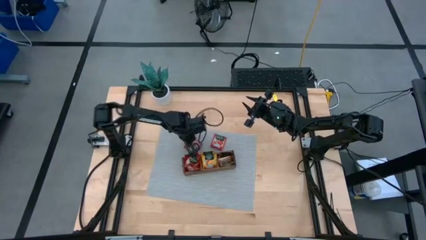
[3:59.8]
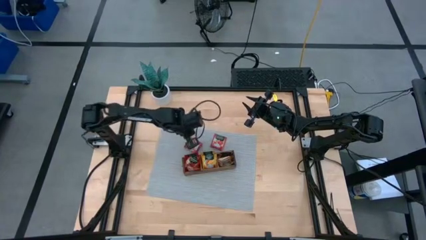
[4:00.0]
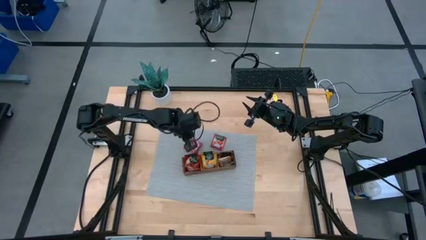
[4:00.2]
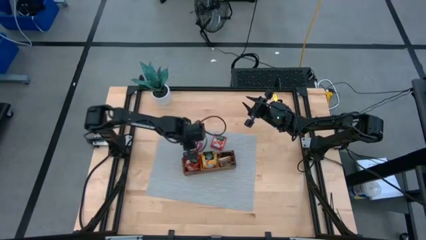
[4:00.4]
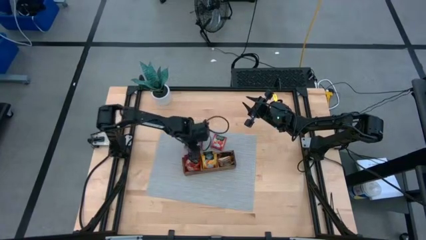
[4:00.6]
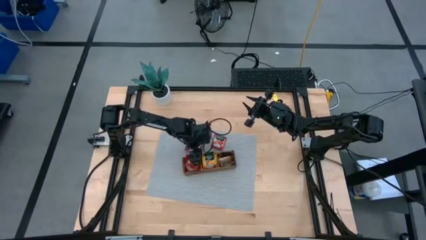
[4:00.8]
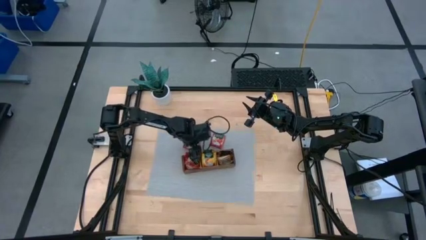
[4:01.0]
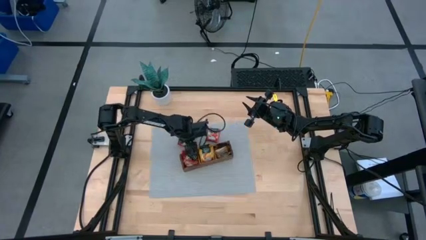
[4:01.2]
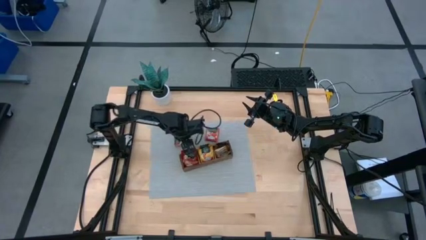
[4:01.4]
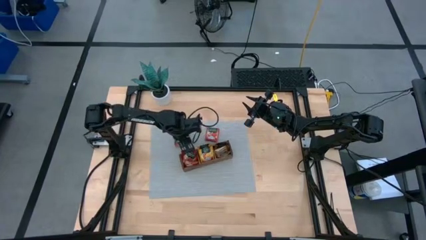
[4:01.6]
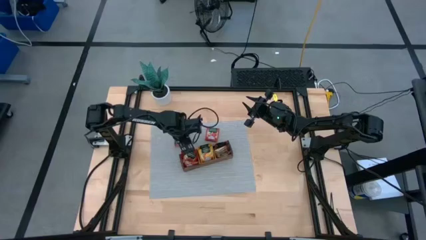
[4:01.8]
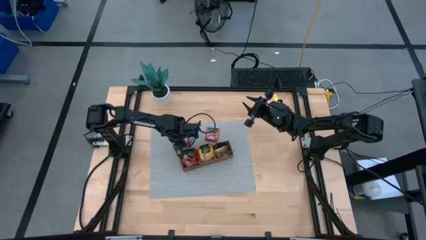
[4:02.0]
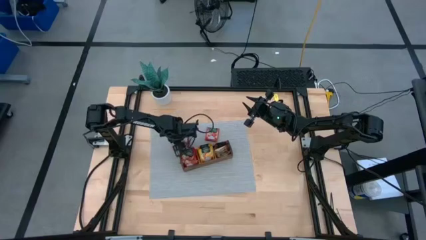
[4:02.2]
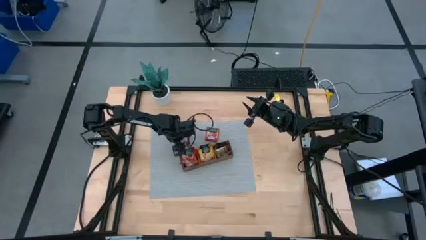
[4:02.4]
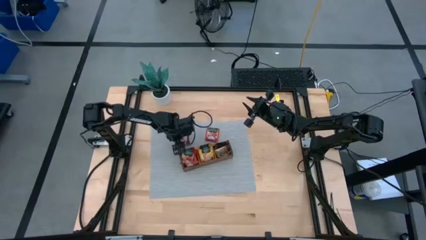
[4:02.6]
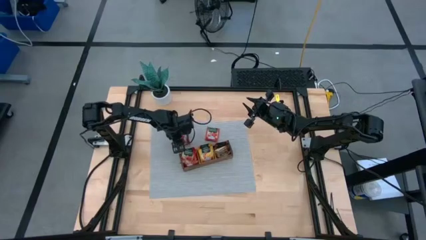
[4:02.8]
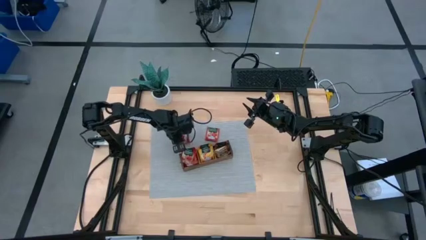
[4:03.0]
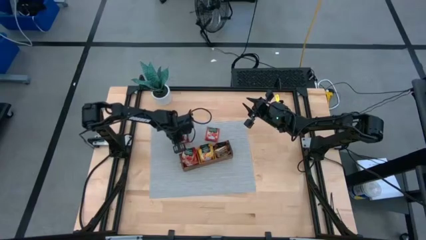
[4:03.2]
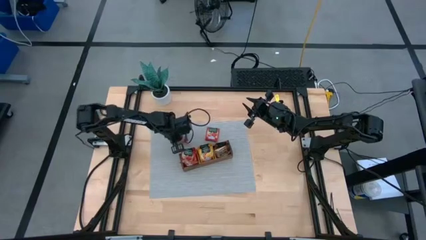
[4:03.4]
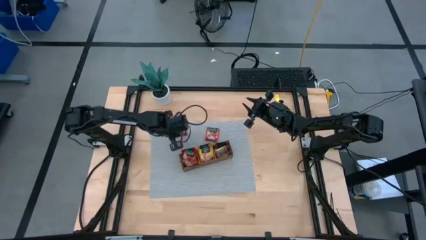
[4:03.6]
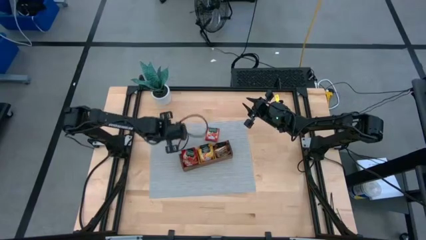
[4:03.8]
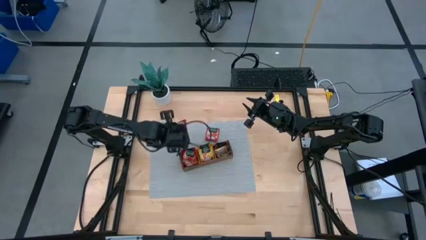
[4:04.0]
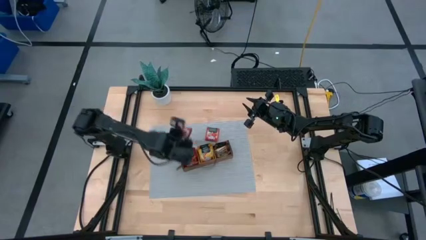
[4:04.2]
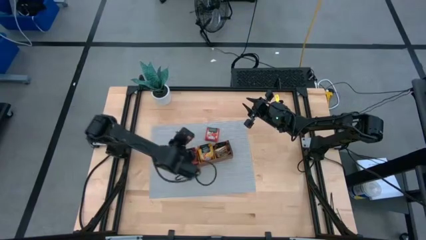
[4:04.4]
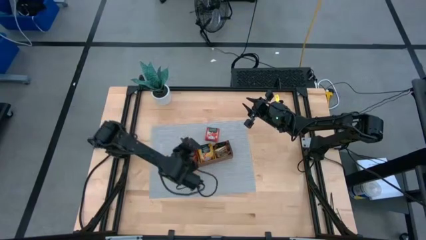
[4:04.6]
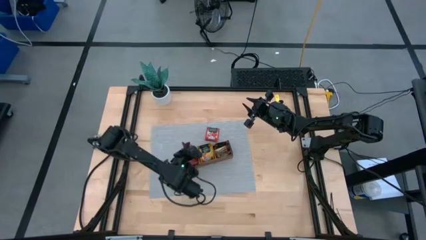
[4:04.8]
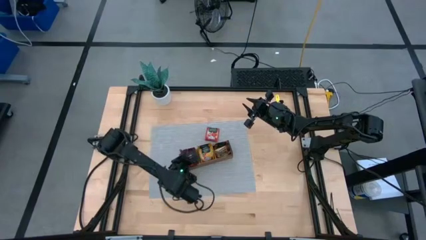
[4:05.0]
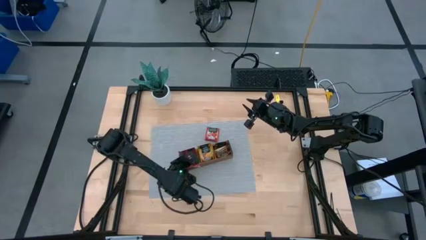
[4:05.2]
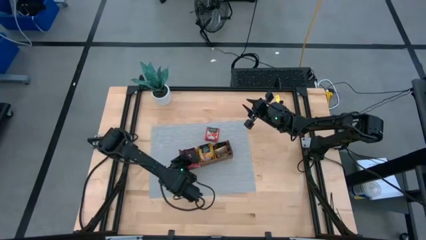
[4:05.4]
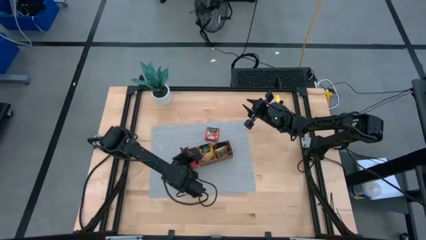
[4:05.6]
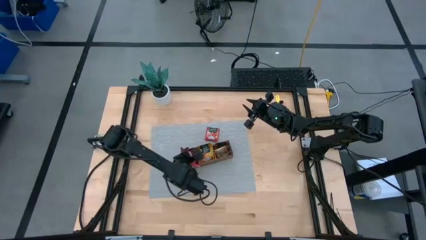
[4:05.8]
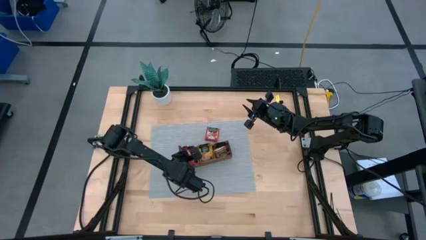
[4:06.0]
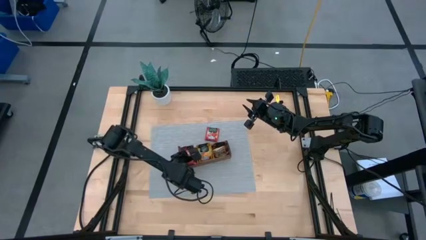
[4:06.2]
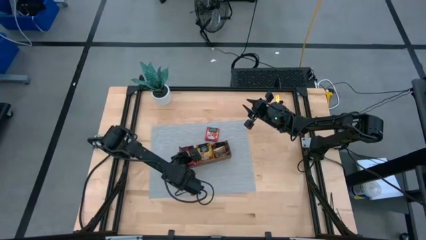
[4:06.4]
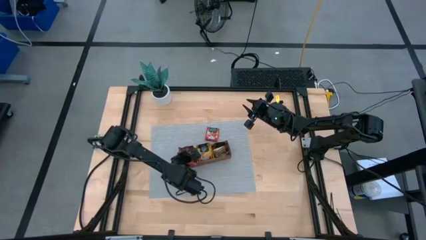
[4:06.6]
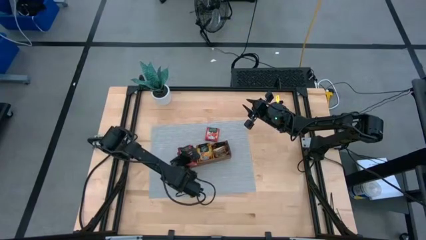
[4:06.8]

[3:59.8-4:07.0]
Task: Pick & Place Tea
Put the red tea bag into the left compartment of the wood organizer

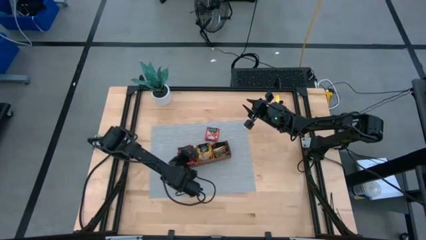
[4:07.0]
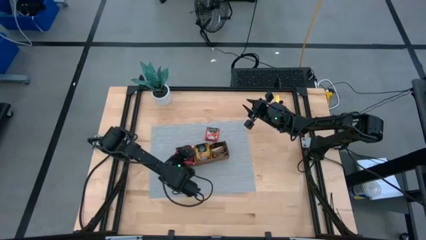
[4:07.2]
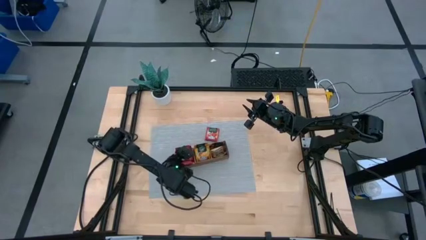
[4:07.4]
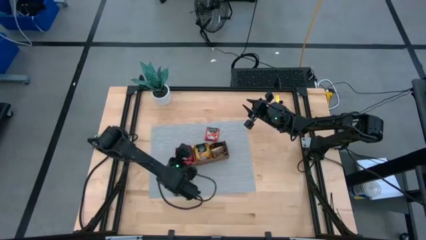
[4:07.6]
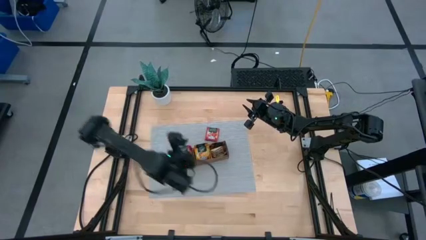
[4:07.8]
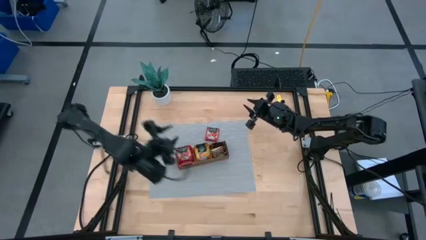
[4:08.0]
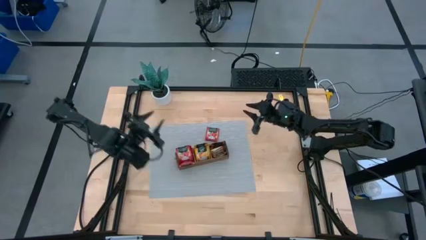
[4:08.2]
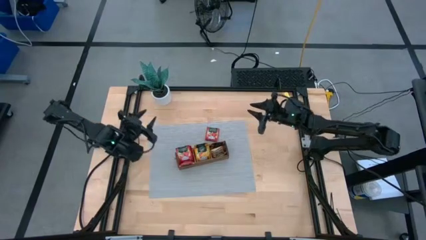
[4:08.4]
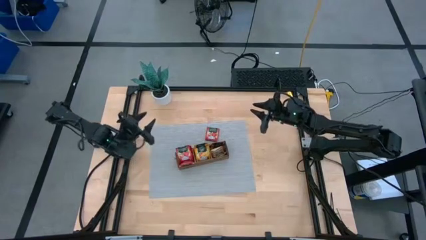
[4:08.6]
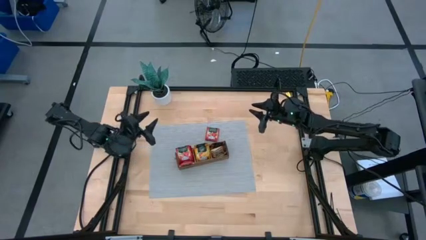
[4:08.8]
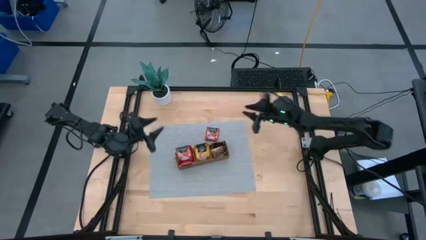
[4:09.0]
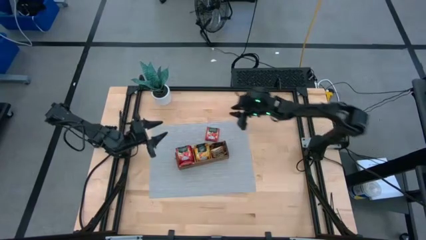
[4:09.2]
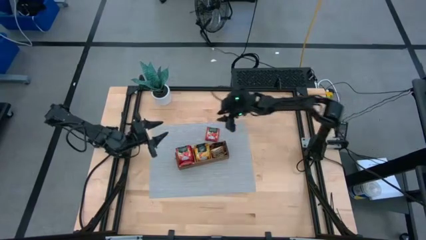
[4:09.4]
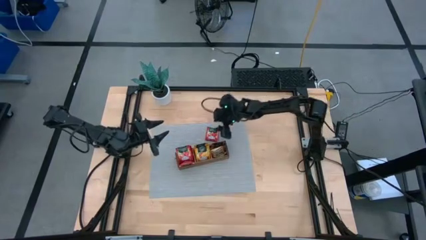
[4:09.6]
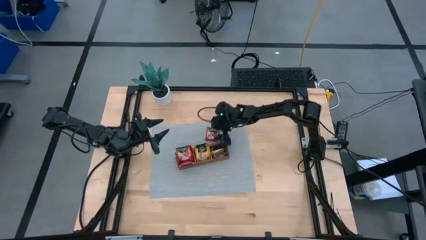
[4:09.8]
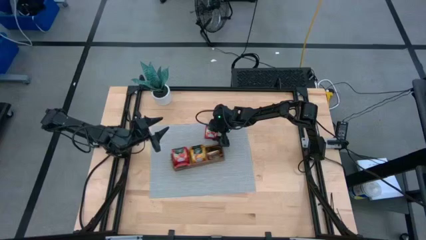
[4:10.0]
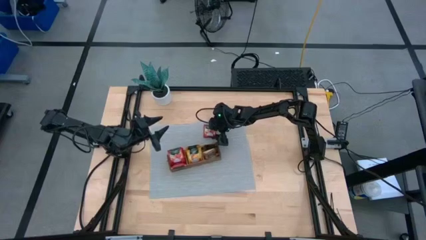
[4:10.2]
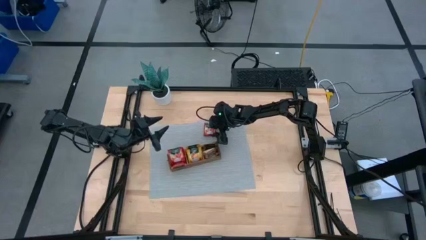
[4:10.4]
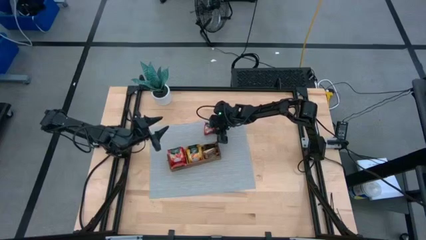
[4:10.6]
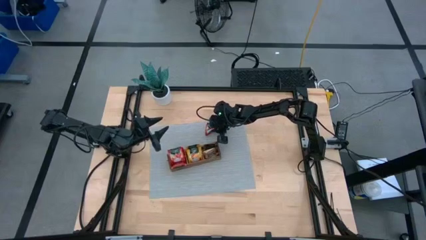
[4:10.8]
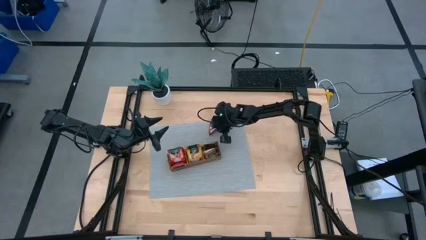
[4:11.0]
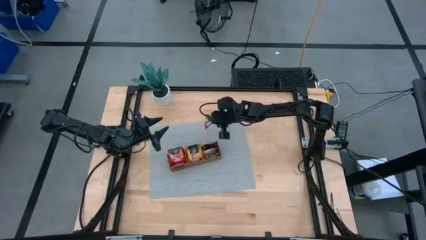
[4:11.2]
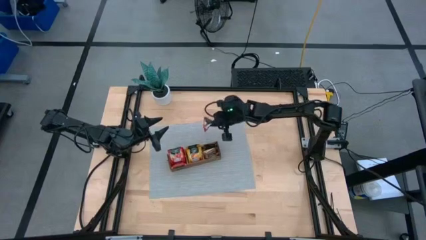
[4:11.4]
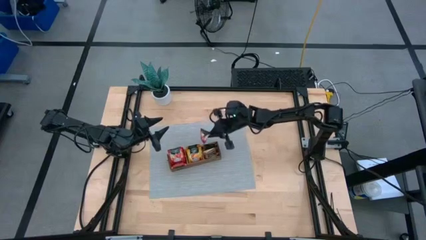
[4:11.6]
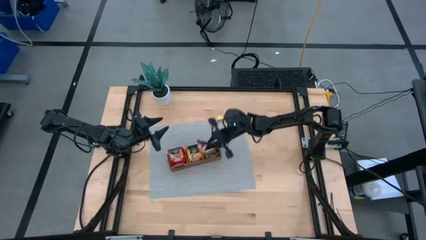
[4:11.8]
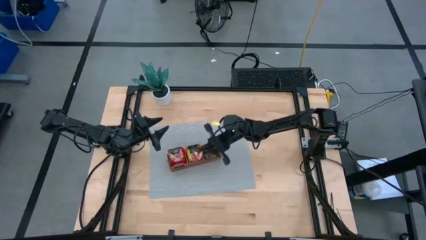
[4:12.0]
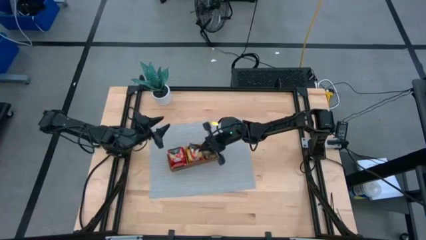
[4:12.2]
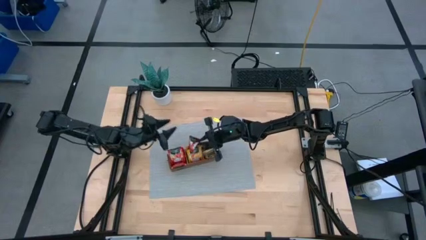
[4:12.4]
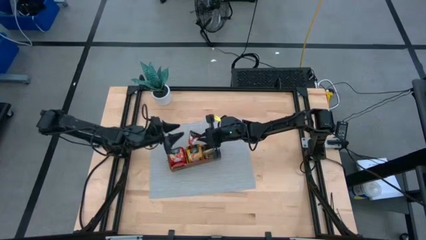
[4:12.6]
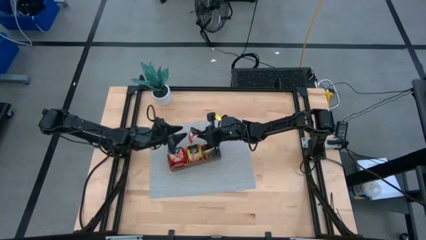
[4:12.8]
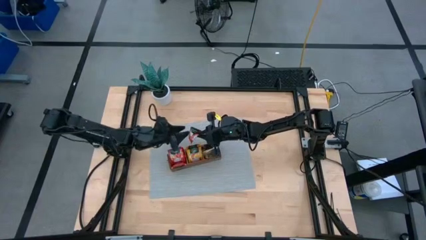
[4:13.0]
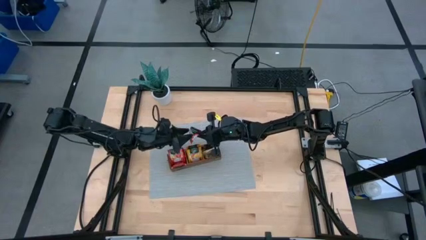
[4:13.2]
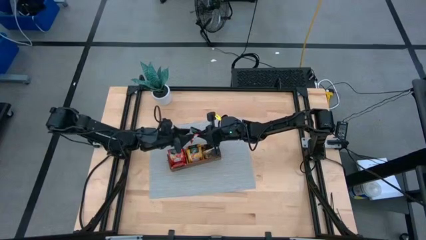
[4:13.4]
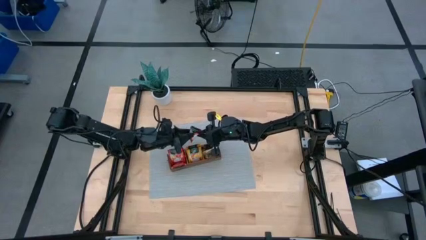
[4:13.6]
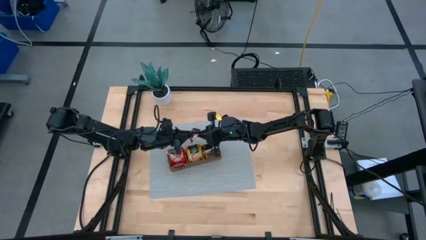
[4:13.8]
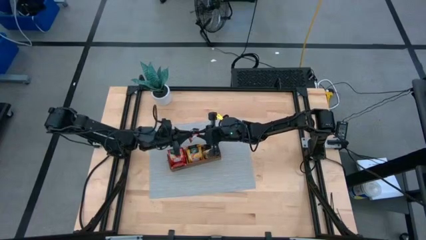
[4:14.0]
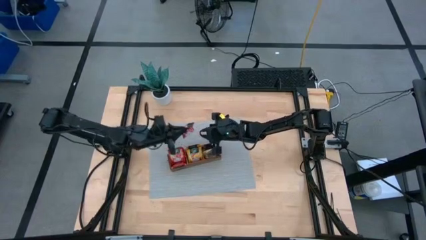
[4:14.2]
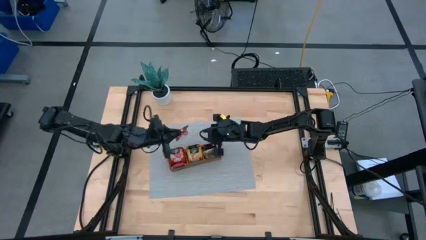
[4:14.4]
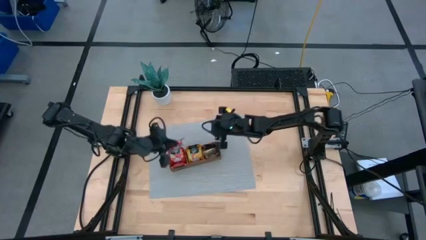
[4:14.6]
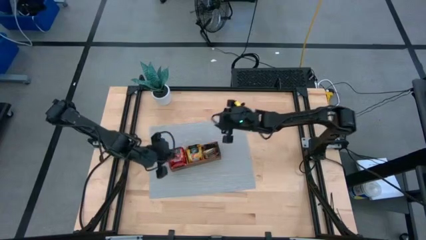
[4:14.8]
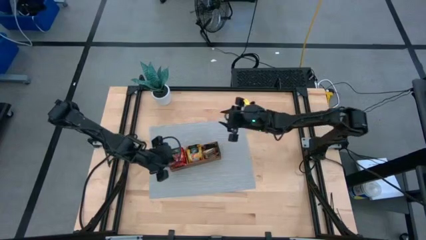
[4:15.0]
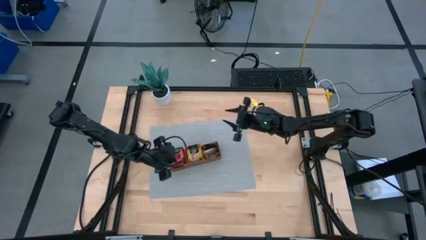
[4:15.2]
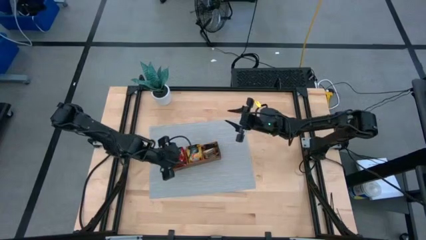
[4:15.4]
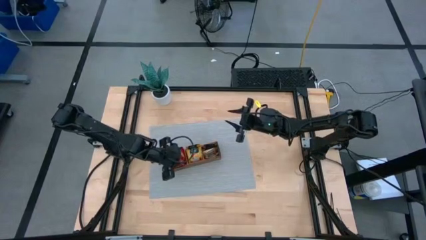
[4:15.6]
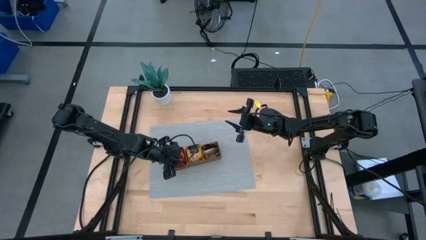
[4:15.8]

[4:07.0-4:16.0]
Put the red tea bag into the left compartment of the wood organizer

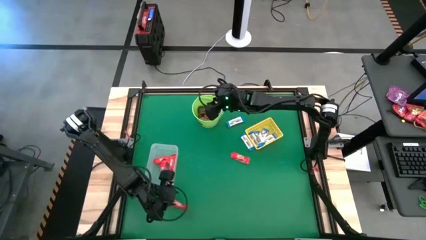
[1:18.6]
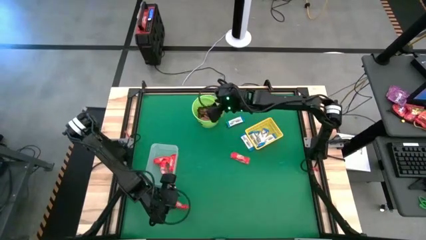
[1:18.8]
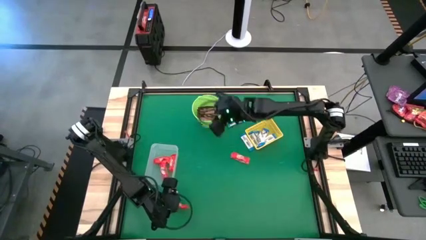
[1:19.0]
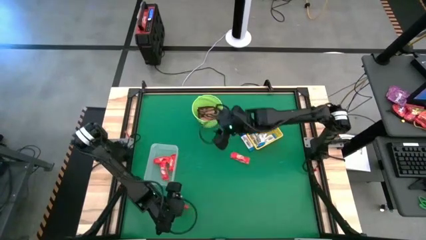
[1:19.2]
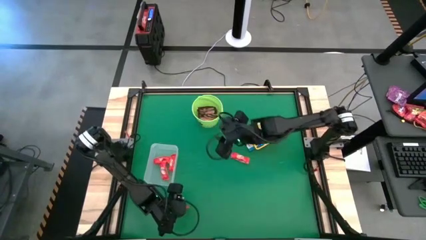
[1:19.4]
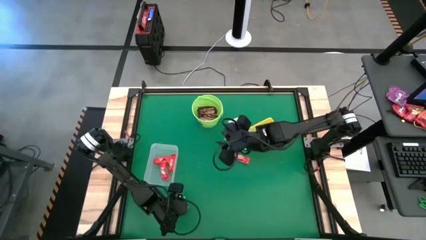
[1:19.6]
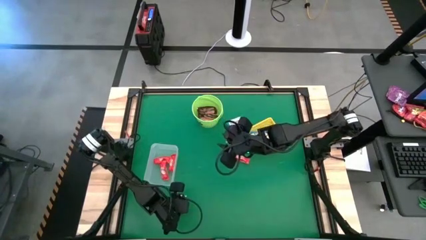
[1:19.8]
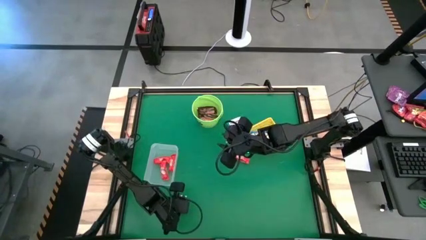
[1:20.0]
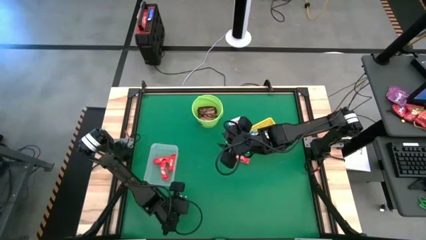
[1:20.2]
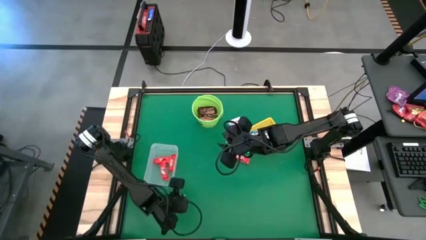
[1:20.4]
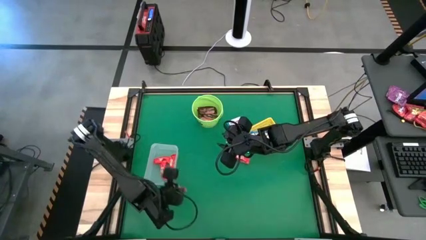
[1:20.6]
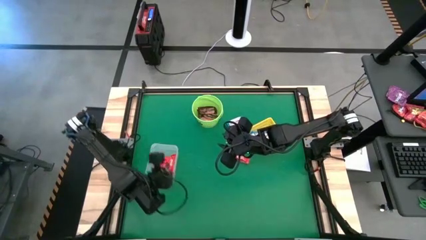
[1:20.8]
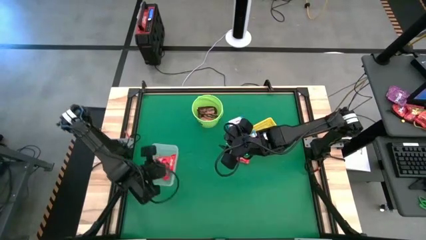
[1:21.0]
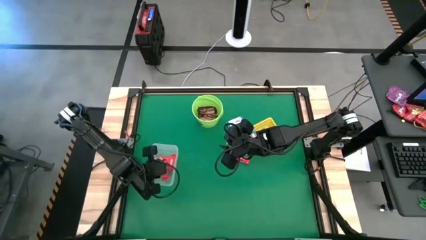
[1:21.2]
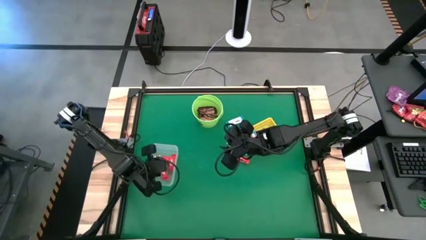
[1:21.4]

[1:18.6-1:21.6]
Task: Sort candy by brand, put in halloween buckets
Put the red chocolate bar into the transparent bin
